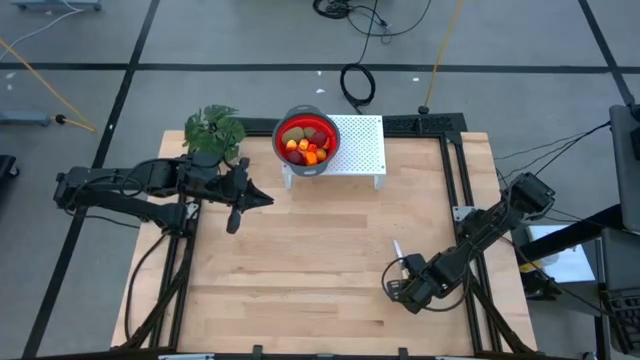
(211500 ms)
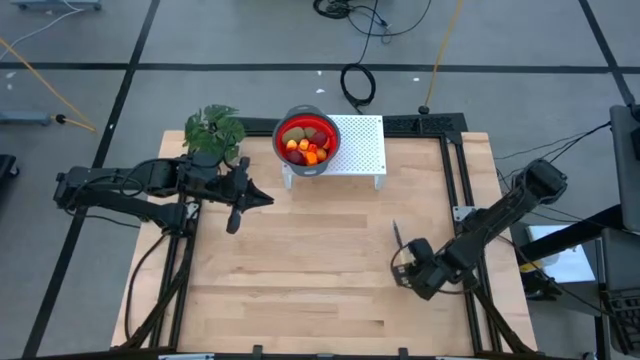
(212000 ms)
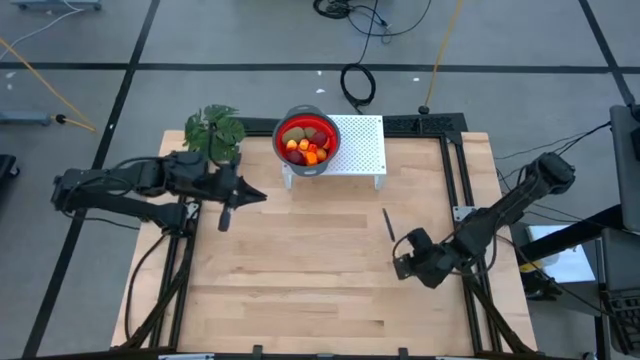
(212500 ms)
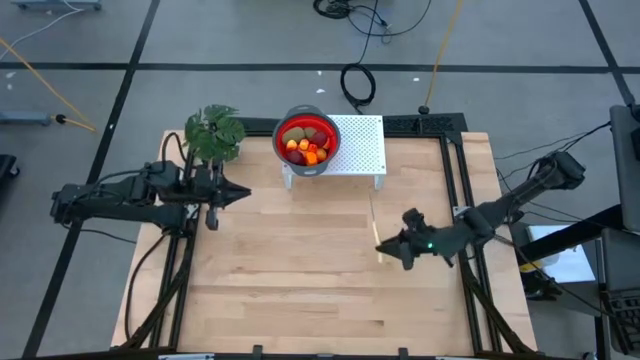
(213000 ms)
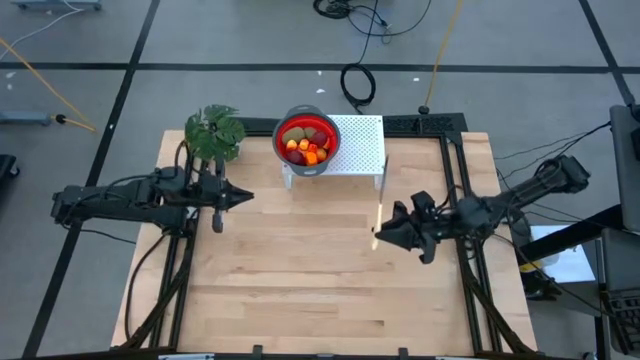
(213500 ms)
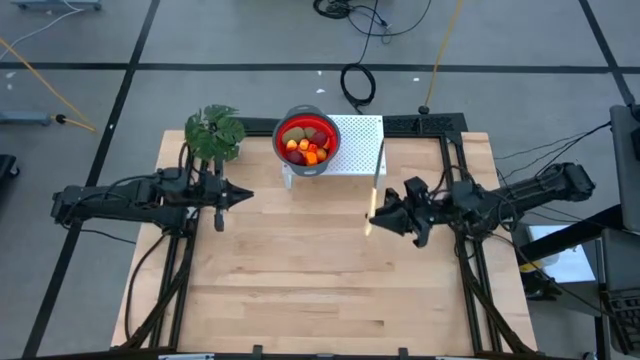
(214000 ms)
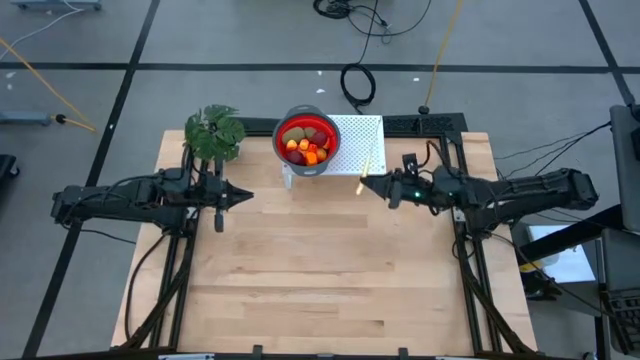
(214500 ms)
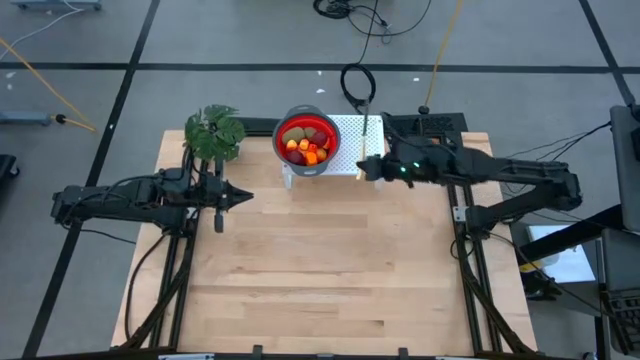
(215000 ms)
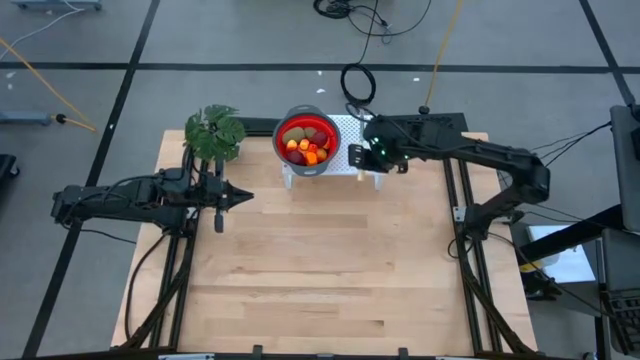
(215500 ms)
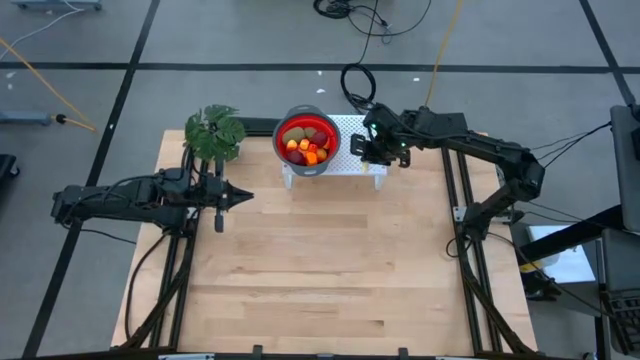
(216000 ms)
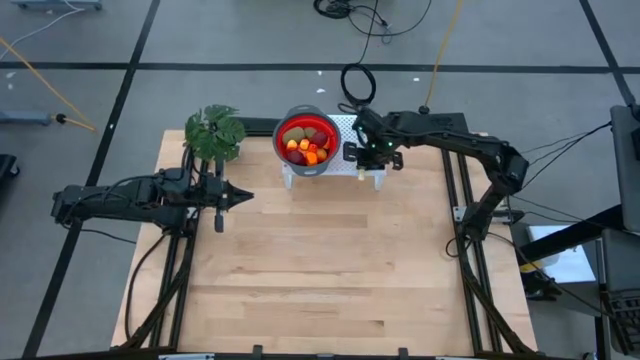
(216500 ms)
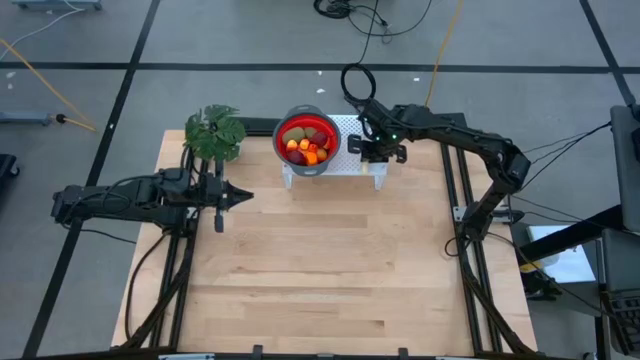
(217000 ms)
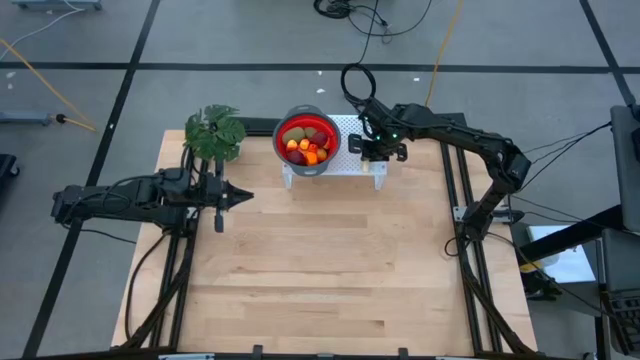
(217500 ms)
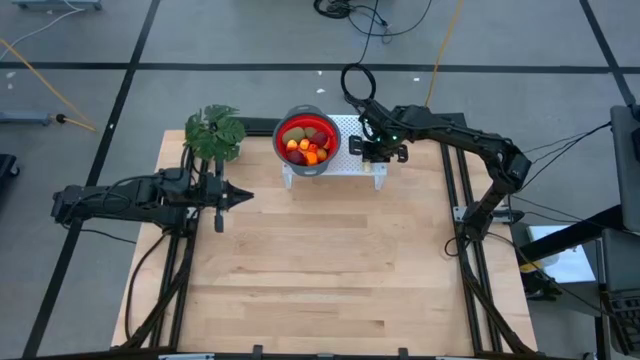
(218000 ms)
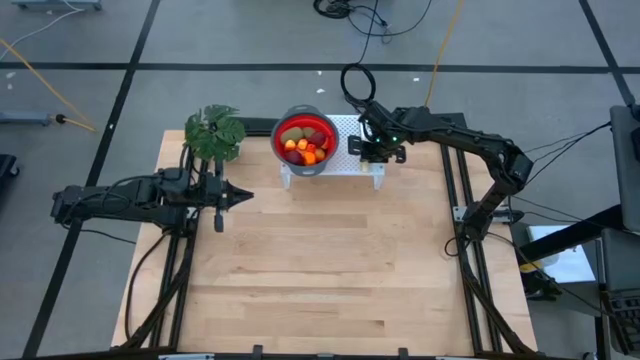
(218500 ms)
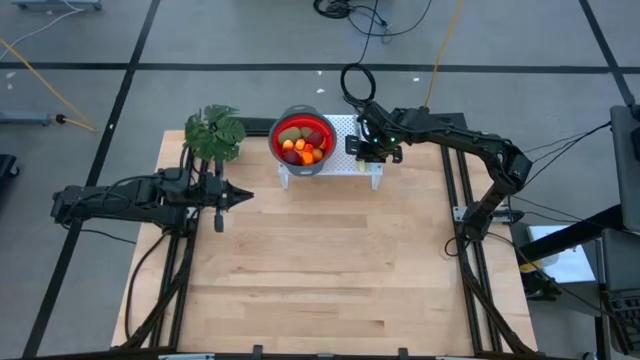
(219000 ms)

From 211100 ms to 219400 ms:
Task: Pick & Place Fruit
Put the yellow table knife on the shelf

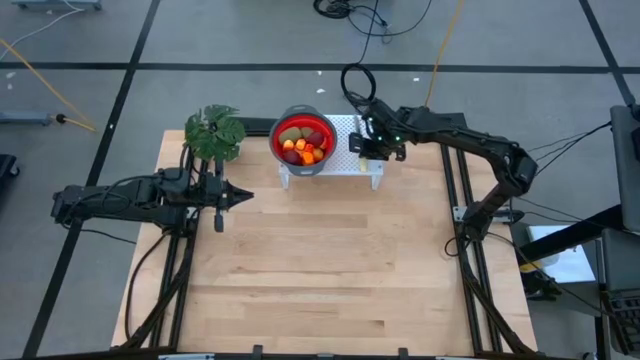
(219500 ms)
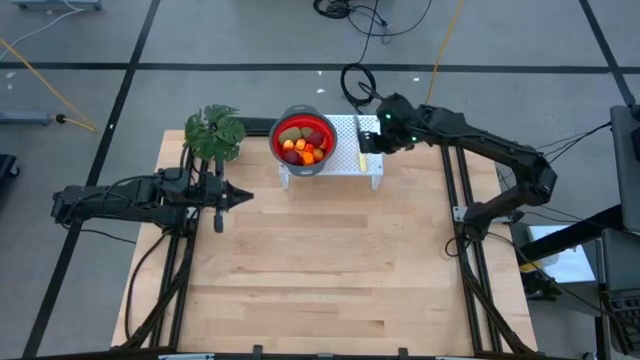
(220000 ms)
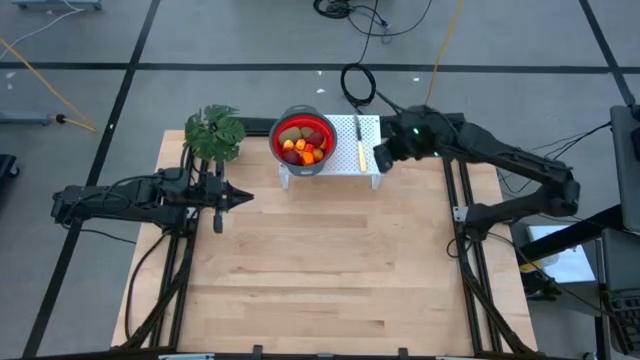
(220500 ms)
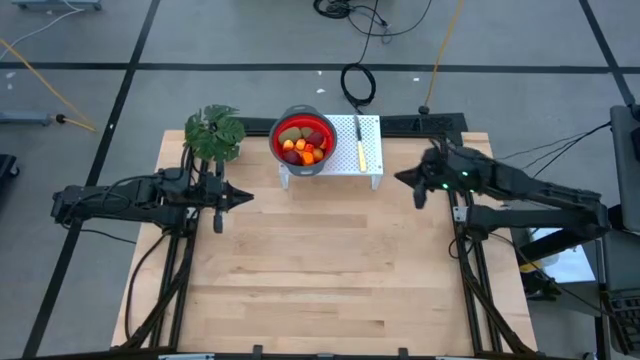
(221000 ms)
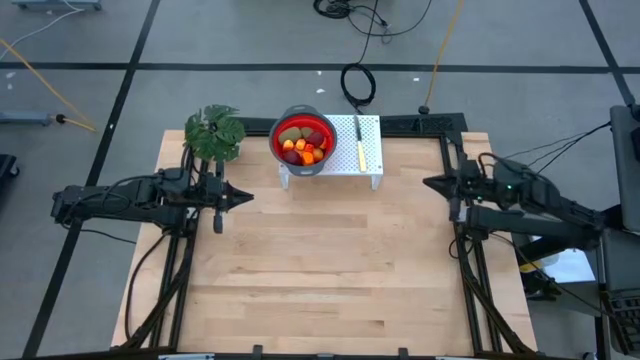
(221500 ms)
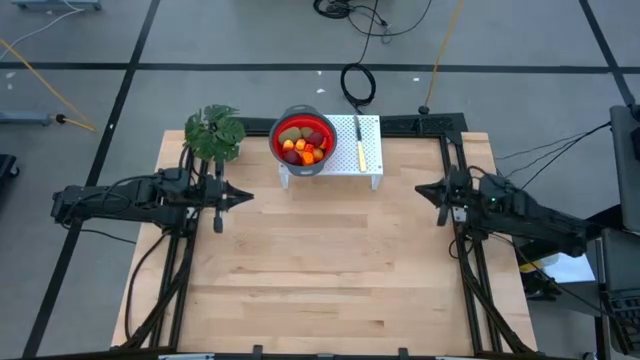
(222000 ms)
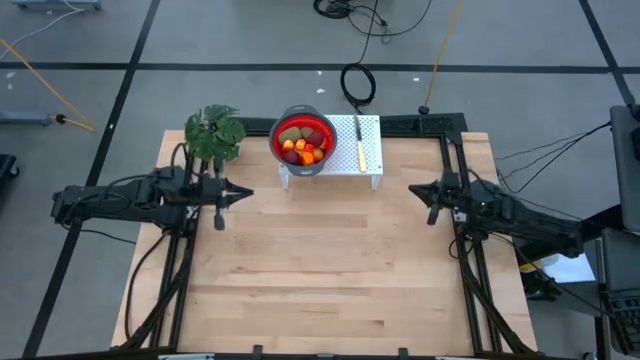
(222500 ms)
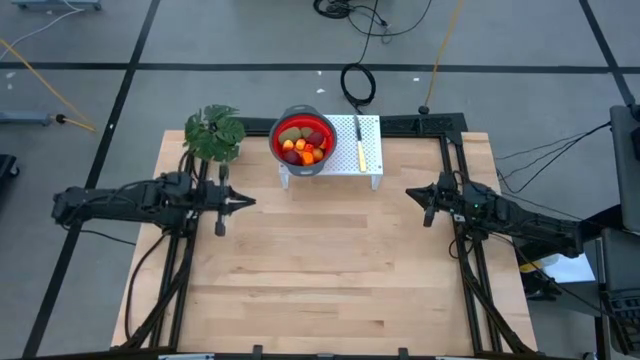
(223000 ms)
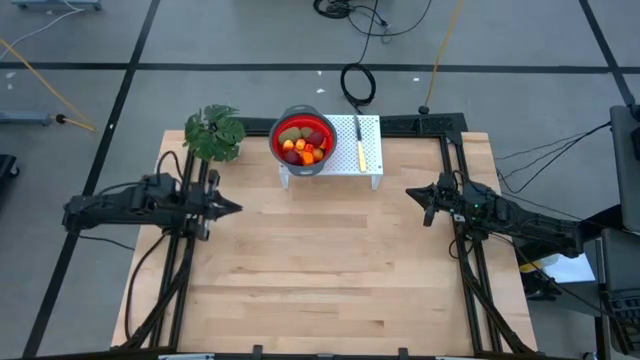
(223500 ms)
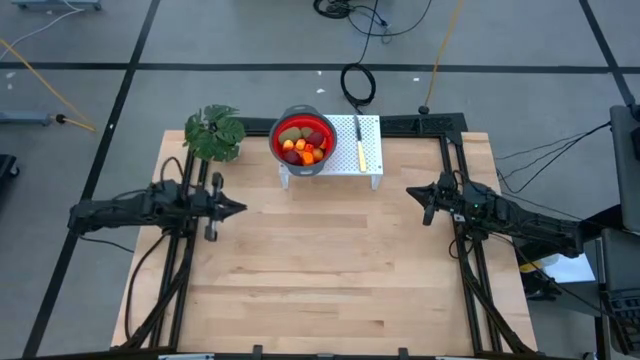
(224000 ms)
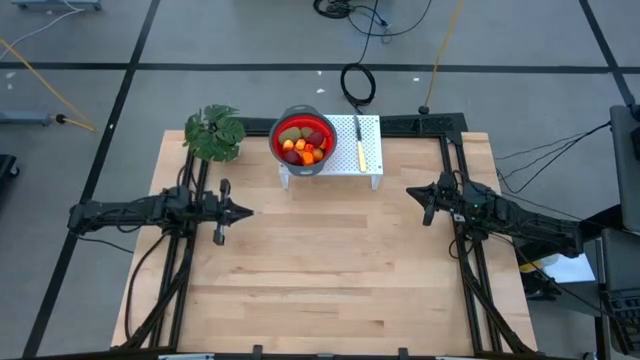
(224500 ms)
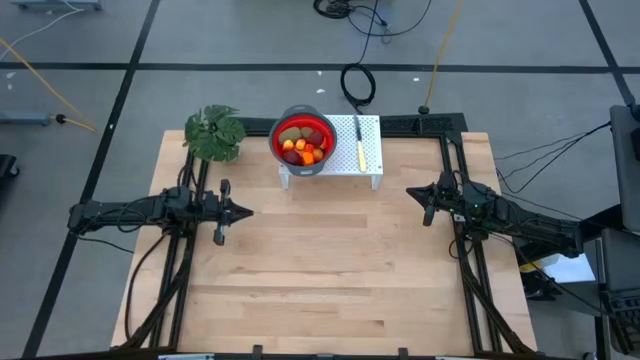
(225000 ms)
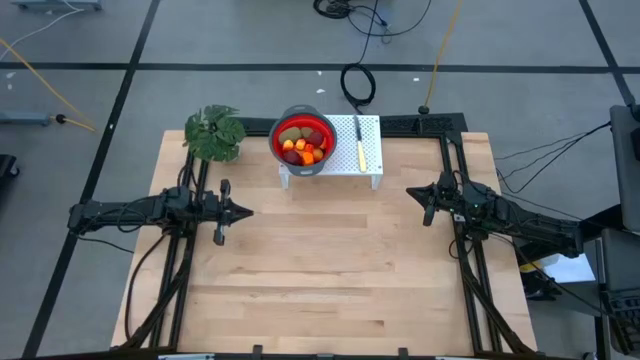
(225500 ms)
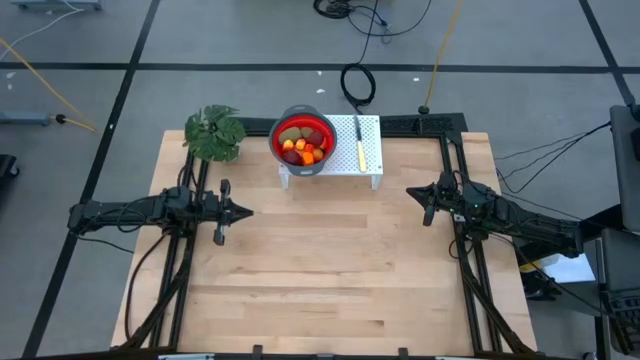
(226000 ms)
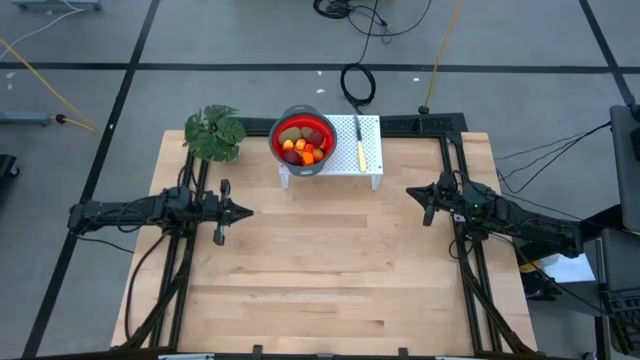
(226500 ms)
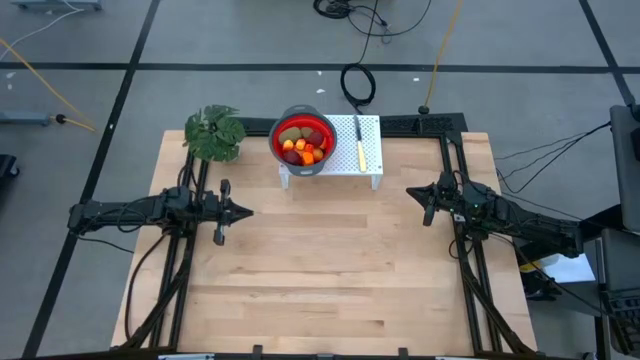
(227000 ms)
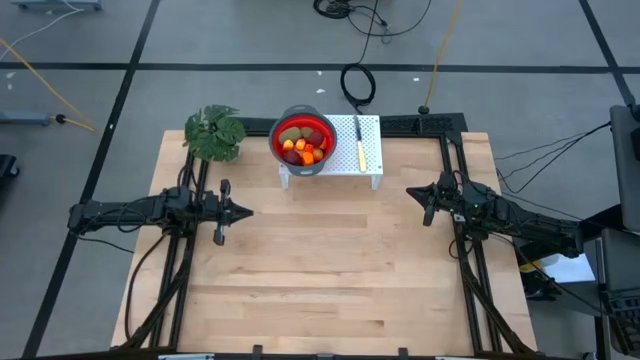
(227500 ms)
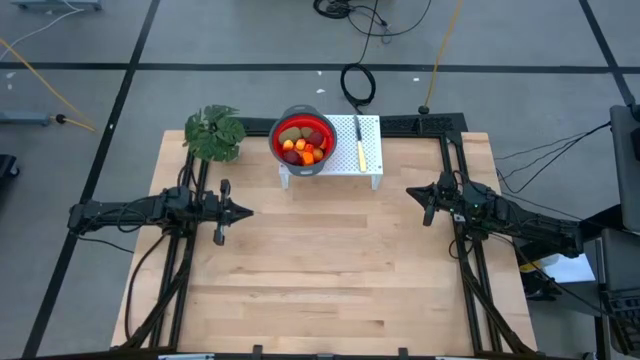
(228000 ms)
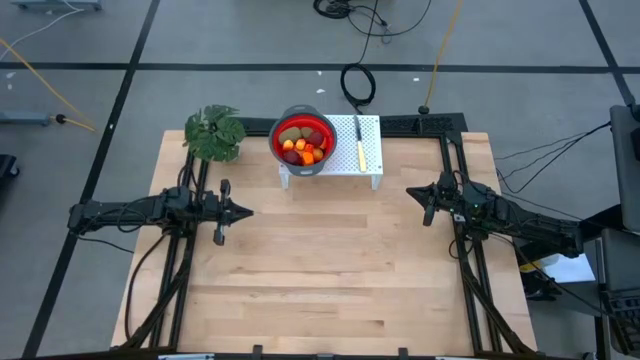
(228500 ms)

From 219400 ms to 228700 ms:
Return to Home Position

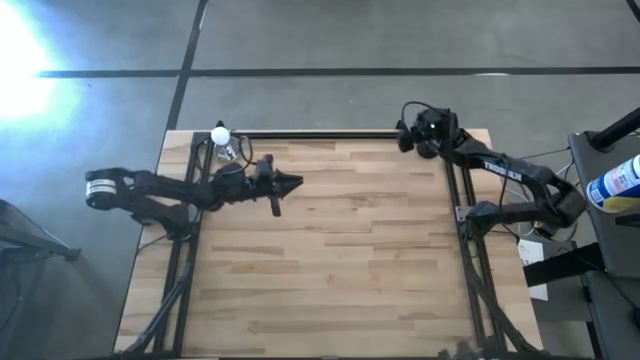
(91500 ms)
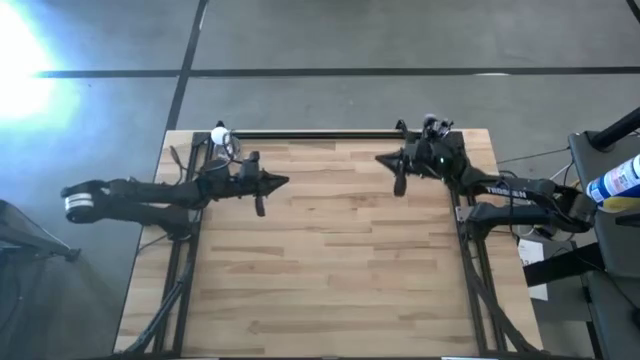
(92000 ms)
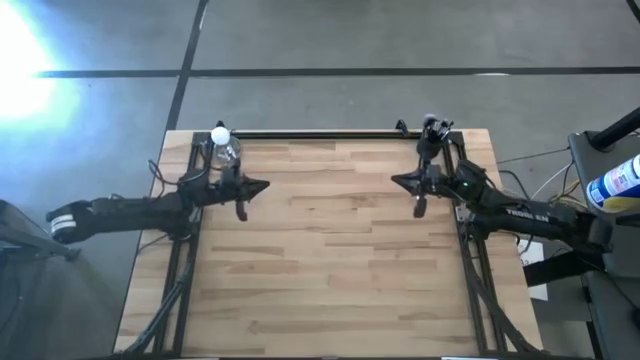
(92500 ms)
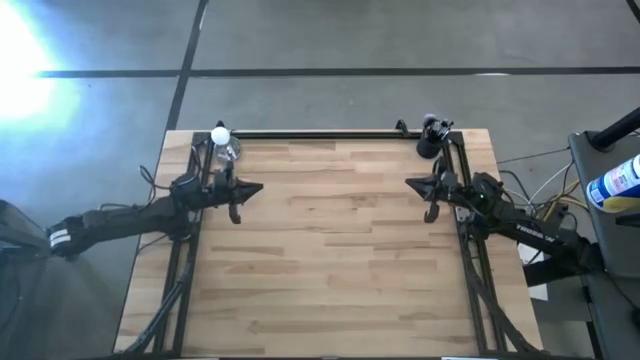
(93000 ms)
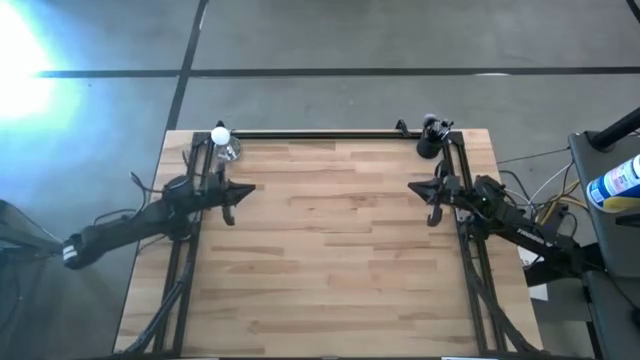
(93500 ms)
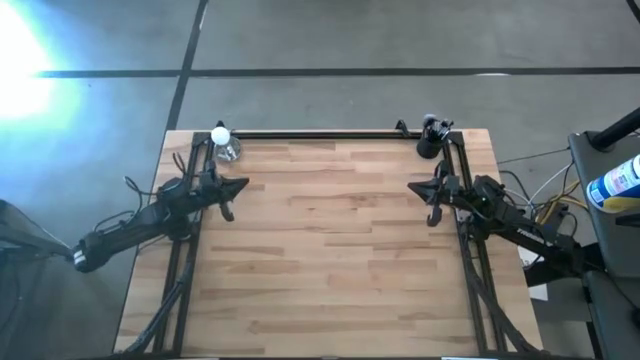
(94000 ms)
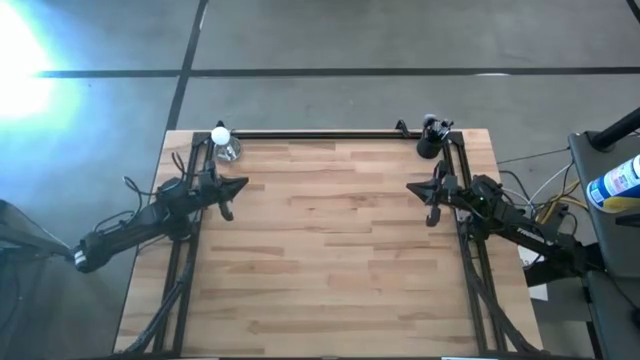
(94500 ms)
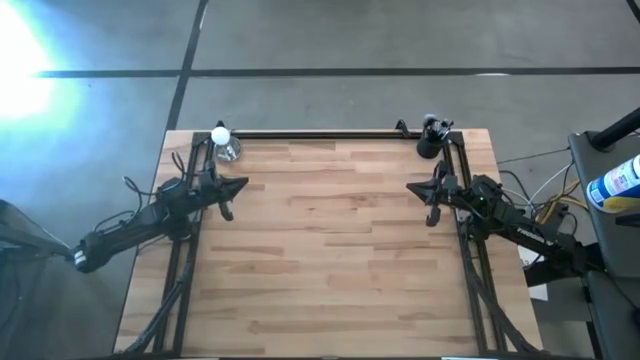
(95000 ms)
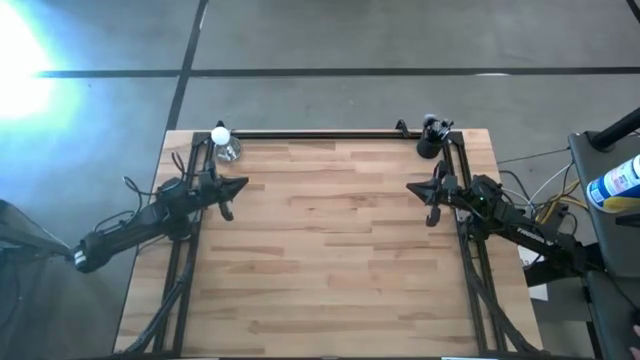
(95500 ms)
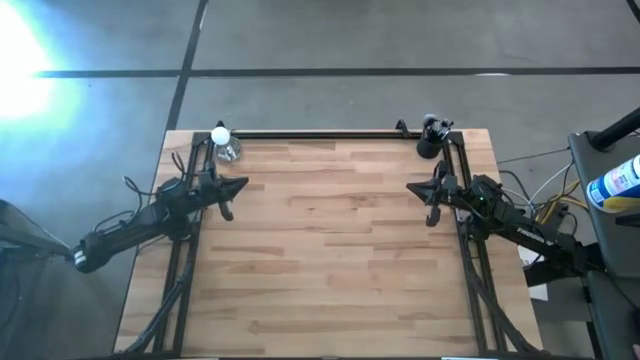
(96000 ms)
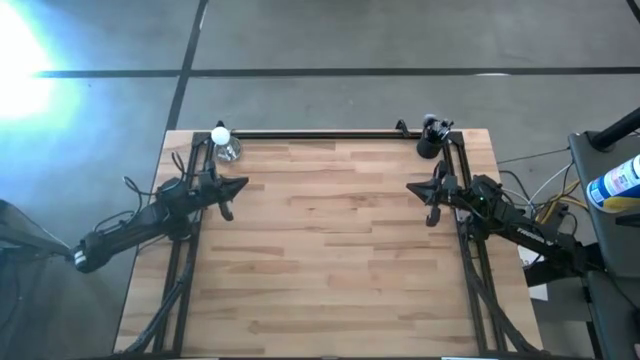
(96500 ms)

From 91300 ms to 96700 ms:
Task: Put items in baskets/containers
Return to Home Position
